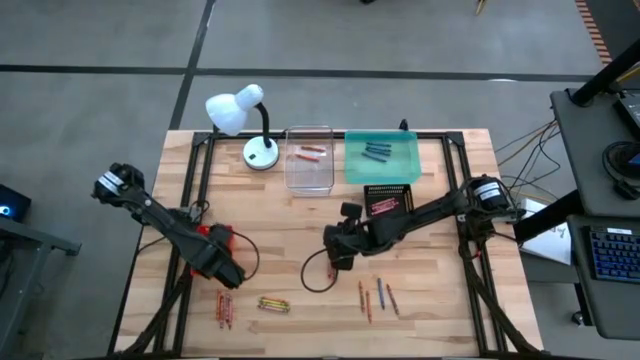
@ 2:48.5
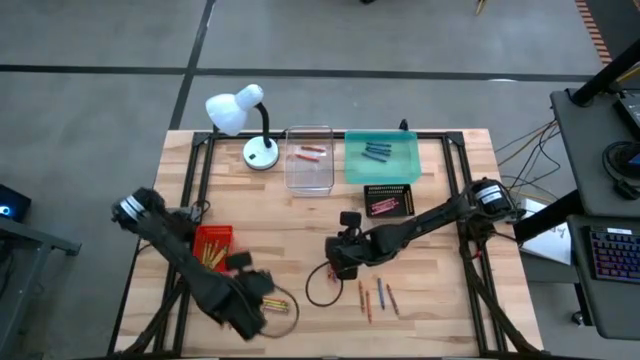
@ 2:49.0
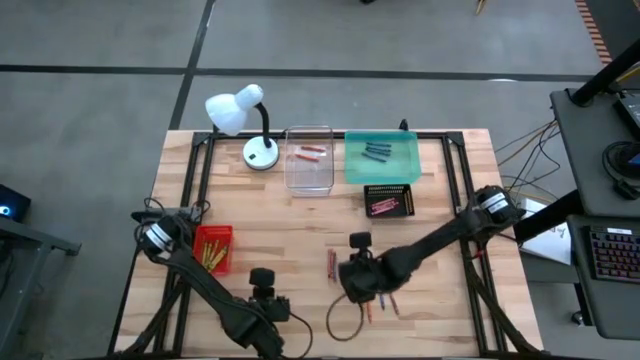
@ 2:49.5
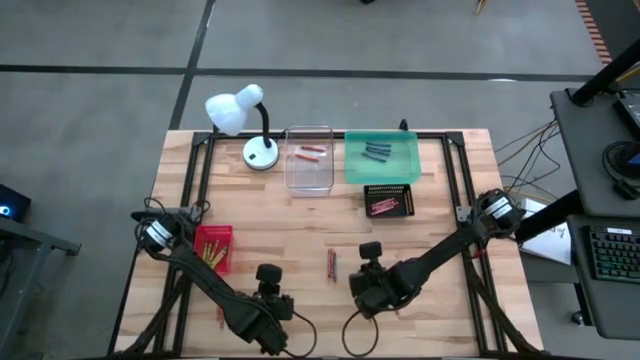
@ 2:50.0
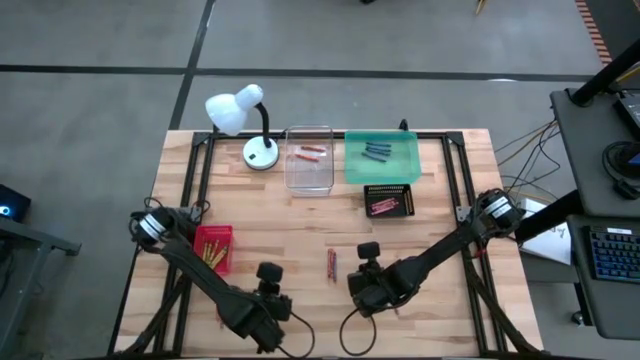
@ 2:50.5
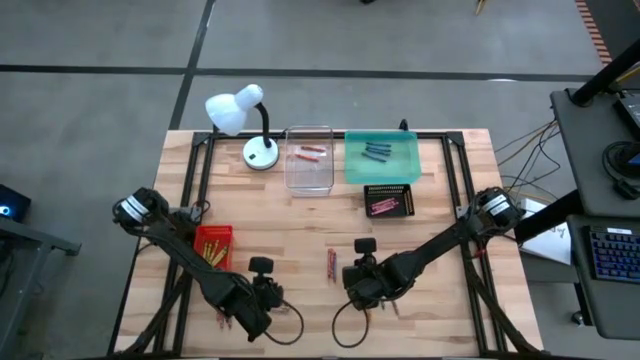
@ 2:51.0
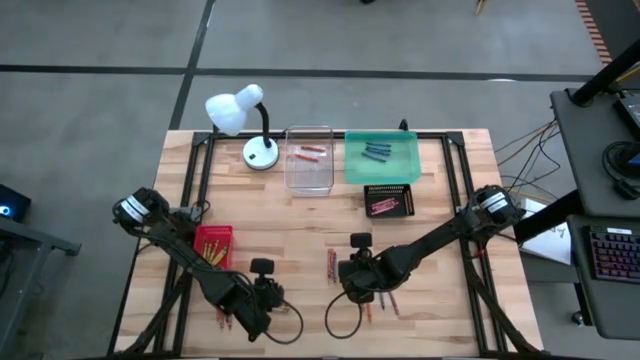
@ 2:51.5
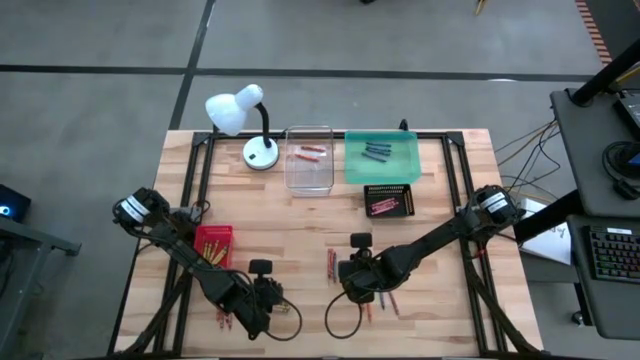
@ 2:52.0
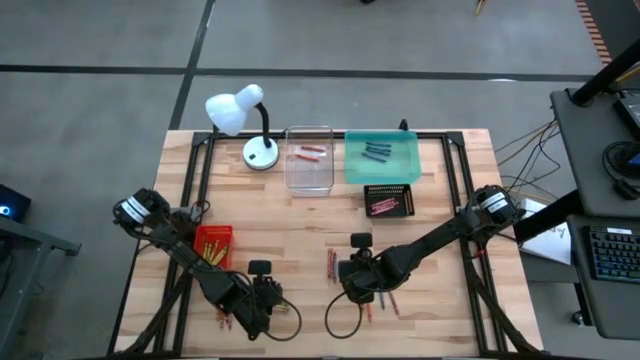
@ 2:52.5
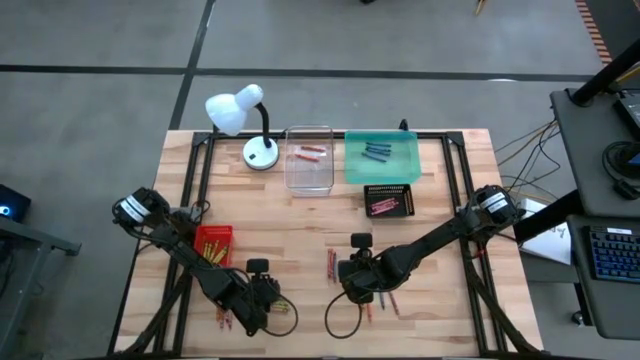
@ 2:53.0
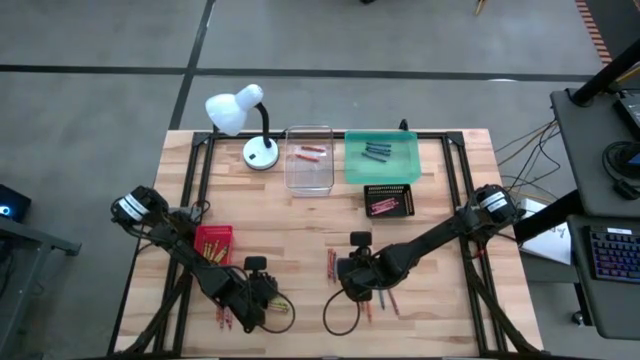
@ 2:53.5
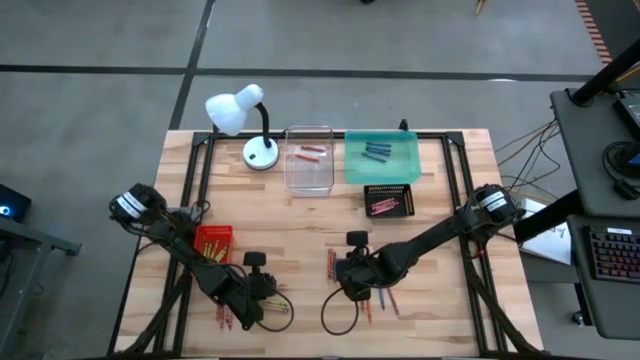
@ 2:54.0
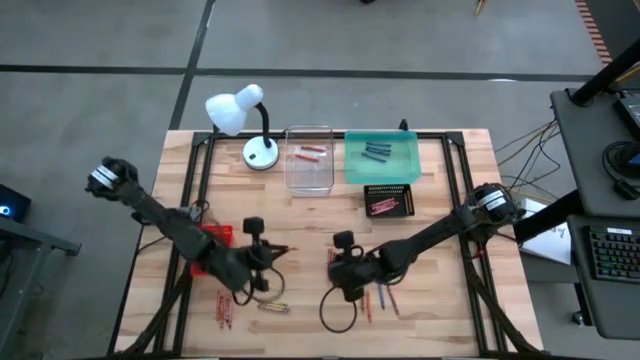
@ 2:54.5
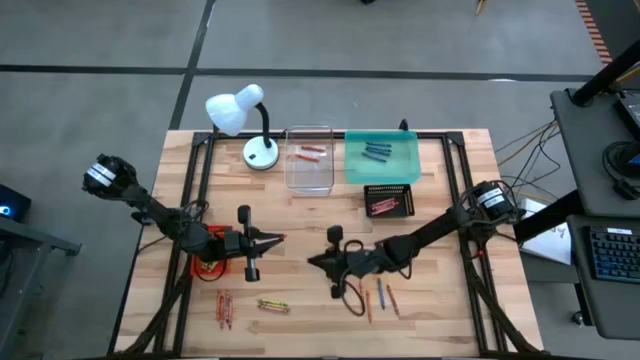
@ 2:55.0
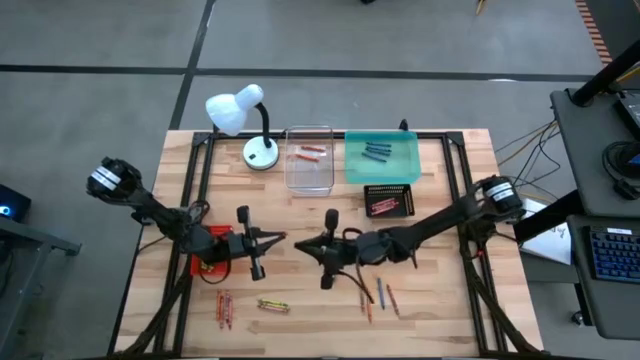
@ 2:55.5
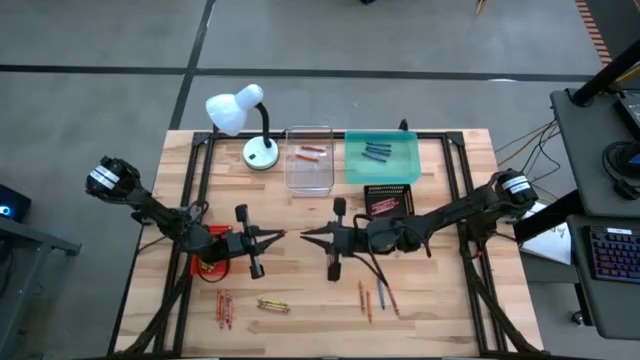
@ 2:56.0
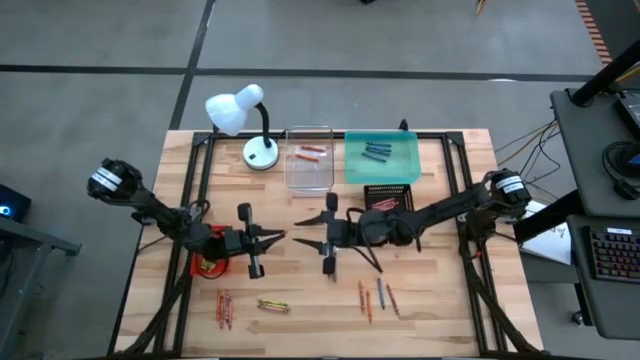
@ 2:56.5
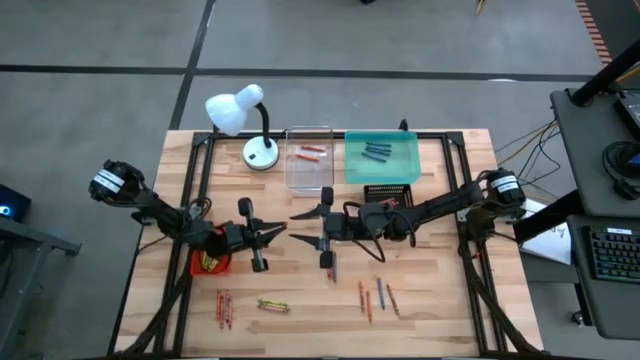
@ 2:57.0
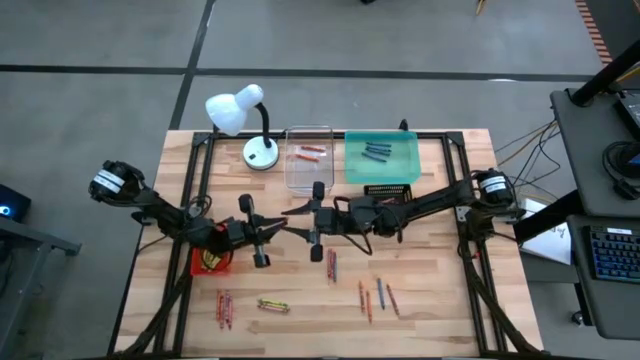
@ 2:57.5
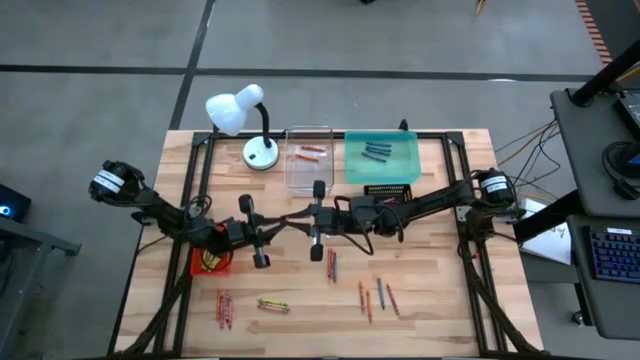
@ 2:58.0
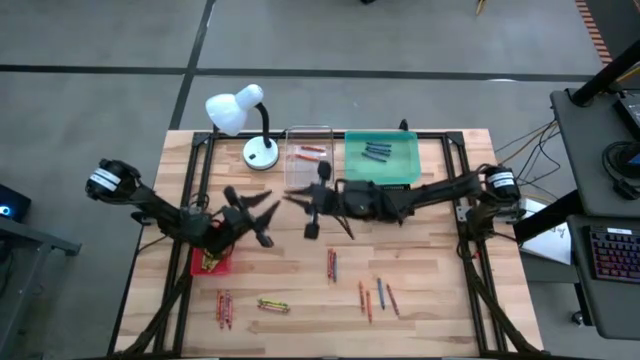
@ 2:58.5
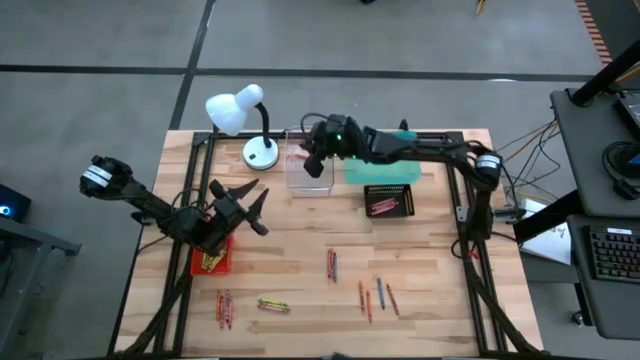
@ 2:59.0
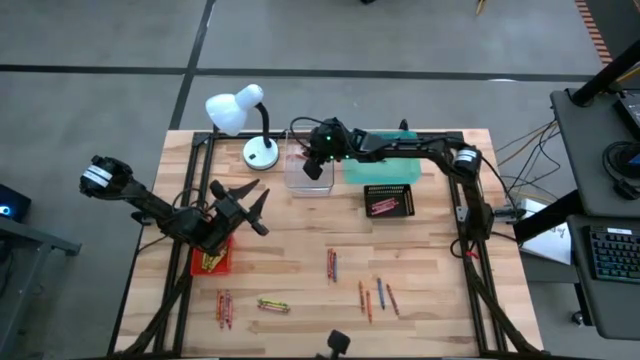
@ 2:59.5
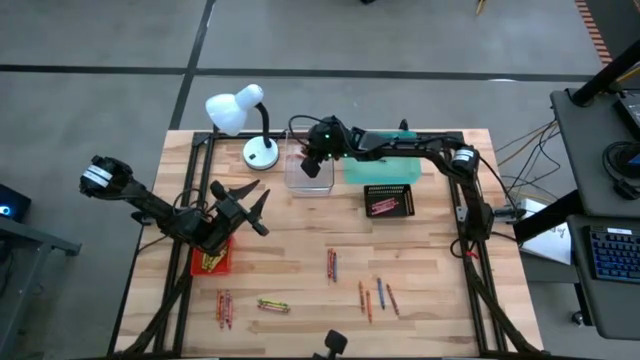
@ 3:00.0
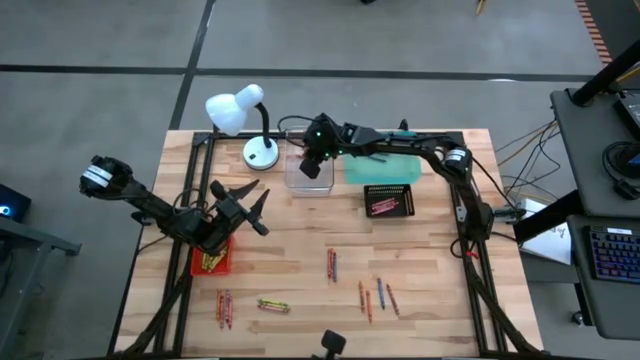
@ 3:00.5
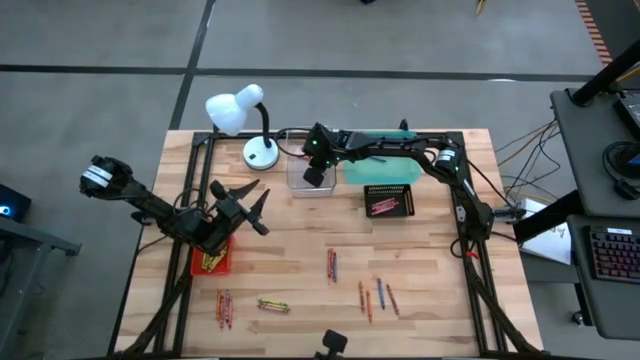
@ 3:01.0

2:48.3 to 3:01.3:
Task: Sort crayons
Put the orange crayon into the transparent bin

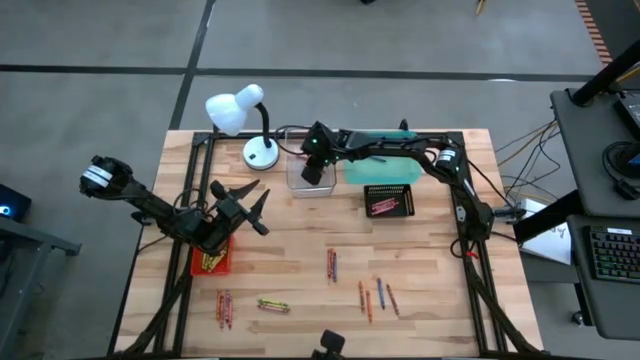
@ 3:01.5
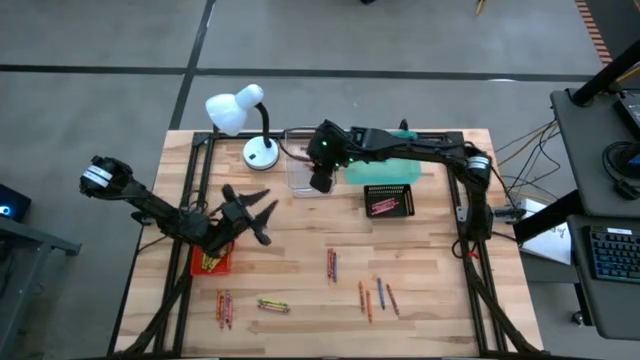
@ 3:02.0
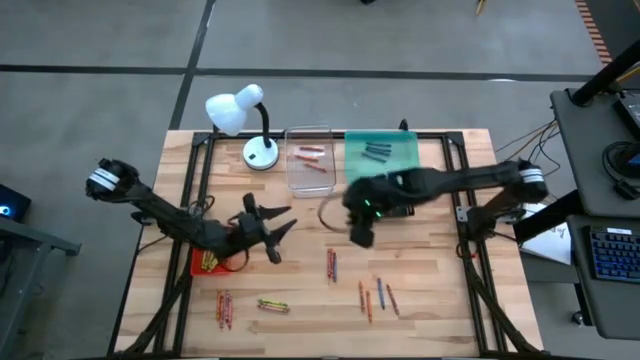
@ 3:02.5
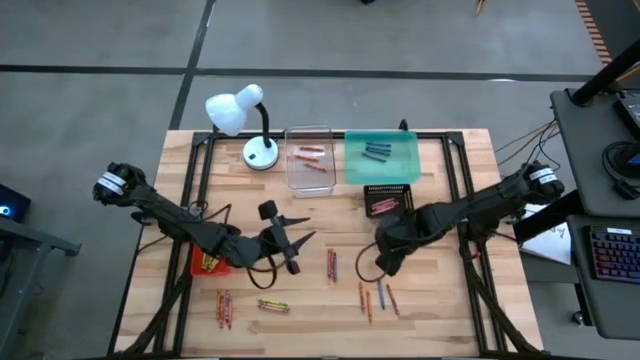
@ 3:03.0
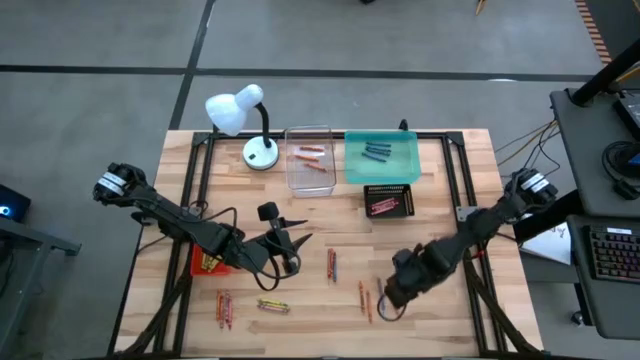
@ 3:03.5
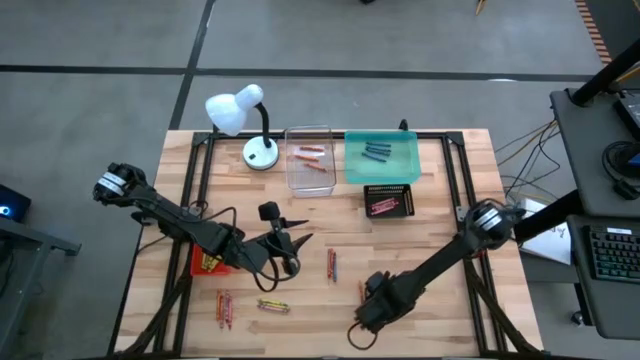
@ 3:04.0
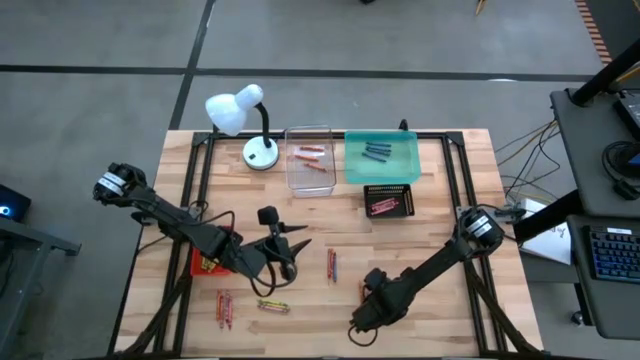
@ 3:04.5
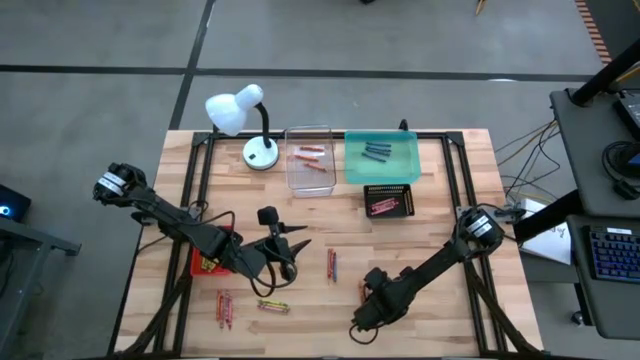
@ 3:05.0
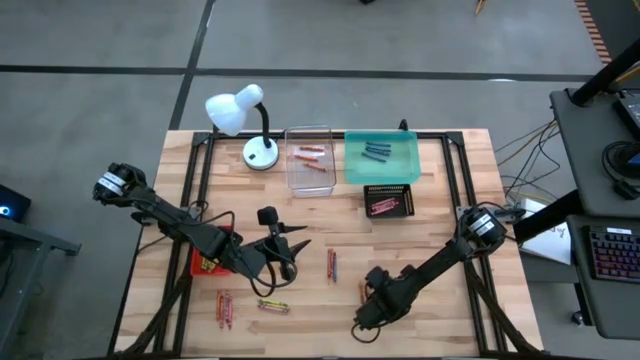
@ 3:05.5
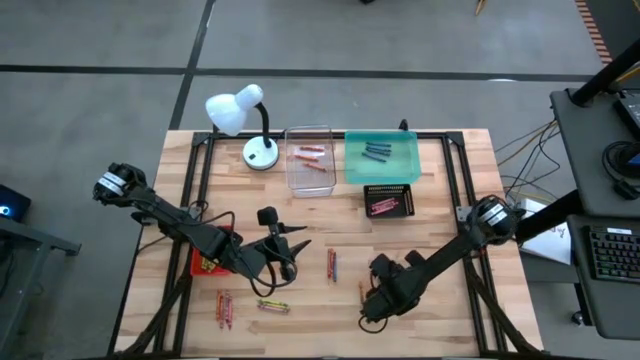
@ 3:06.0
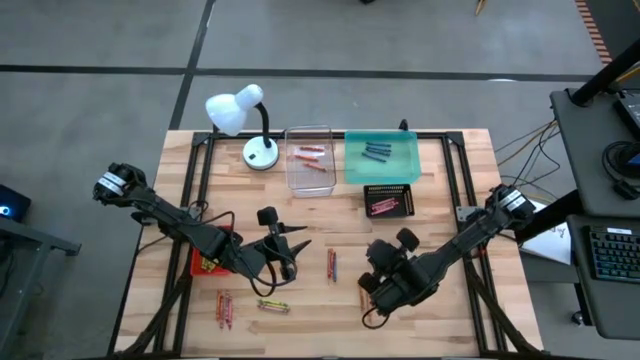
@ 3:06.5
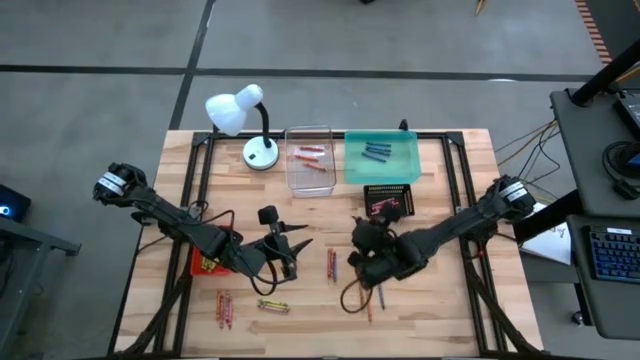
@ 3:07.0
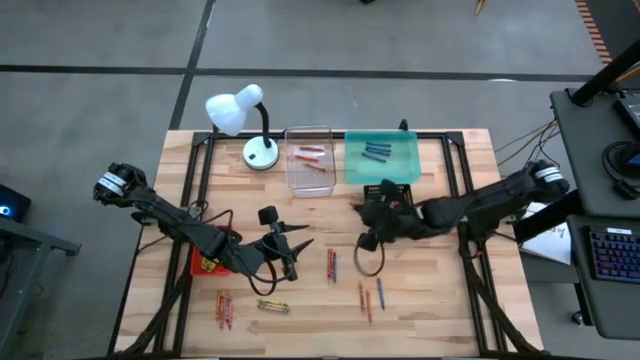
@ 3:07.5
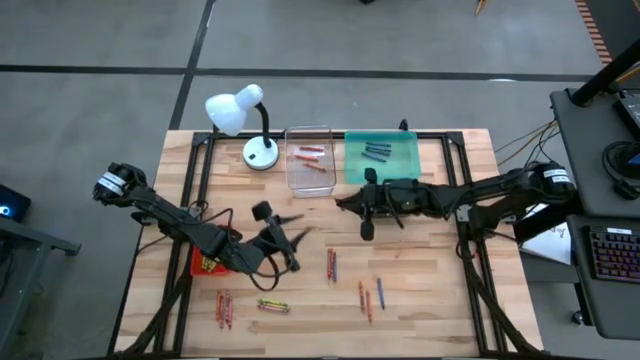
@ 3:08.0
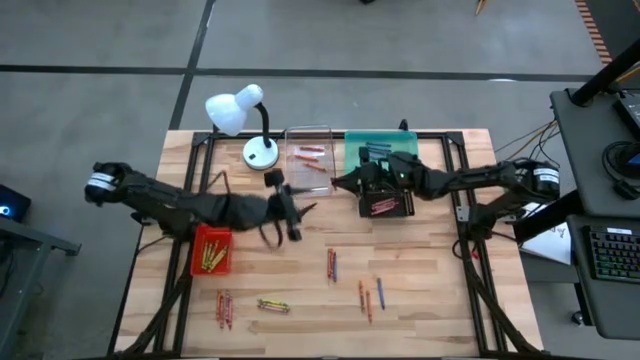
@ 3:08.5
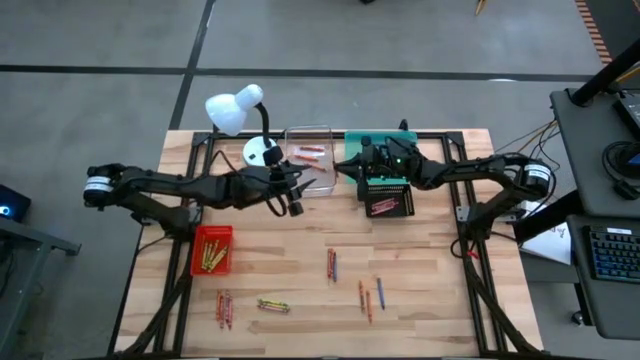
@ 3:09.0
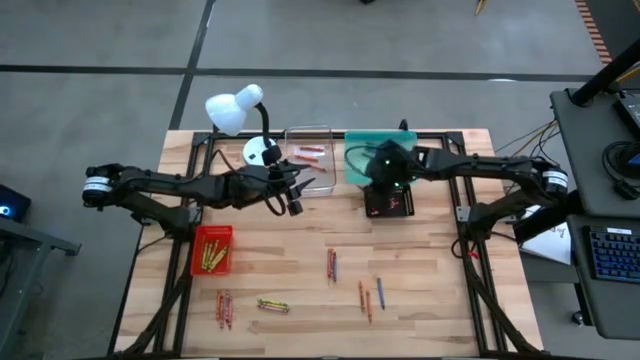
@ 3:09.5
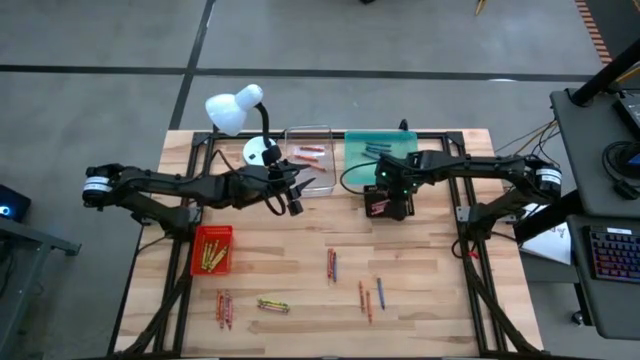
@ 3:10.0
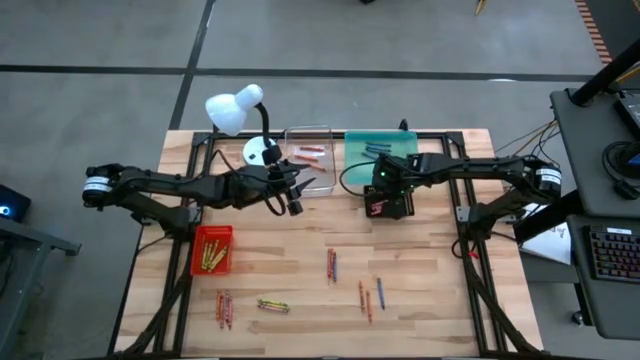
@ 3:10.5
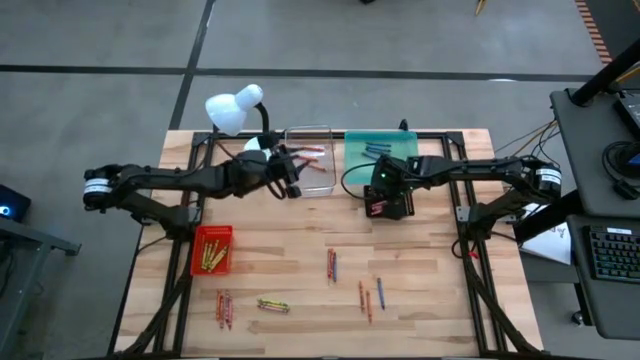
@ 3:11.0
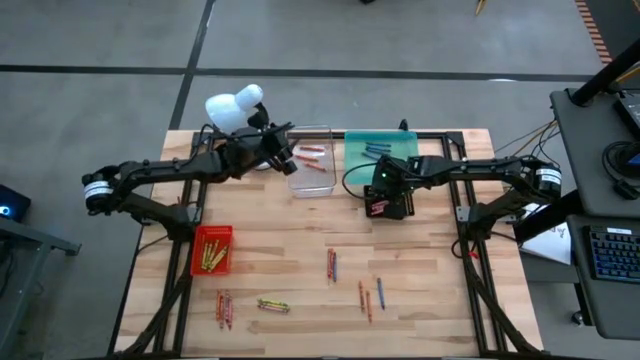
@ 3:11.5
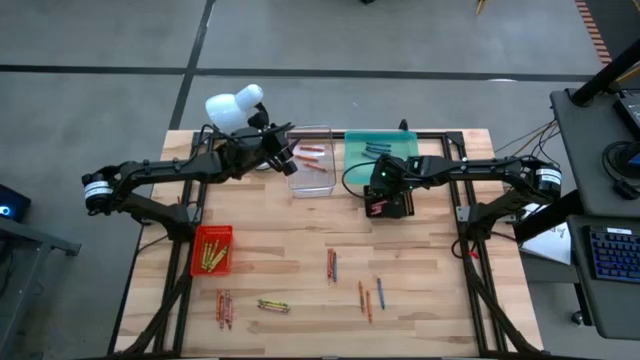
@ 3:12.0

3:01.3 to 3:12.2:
Put the red crayon into the black bin
